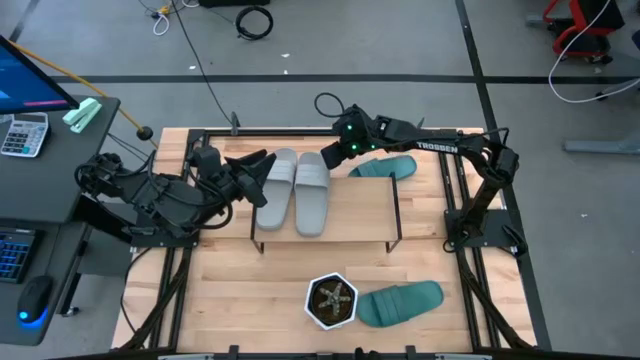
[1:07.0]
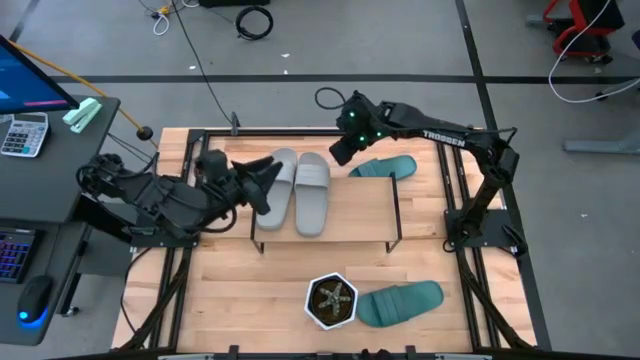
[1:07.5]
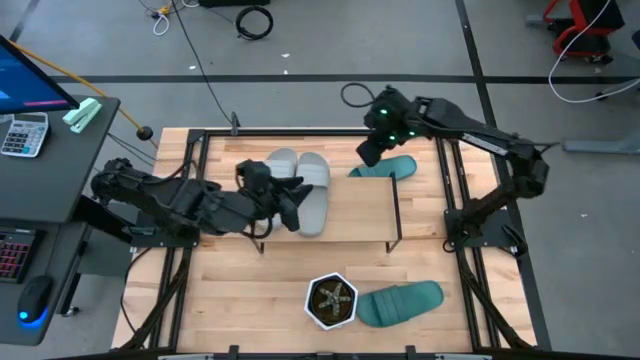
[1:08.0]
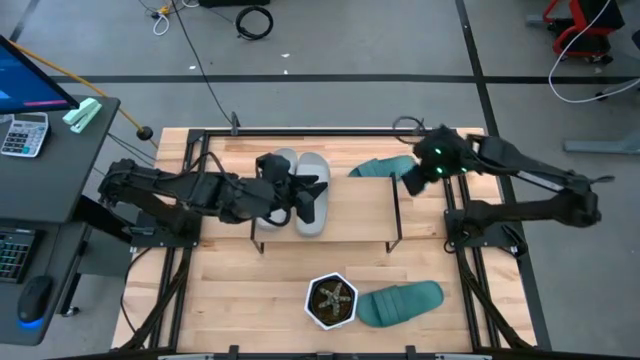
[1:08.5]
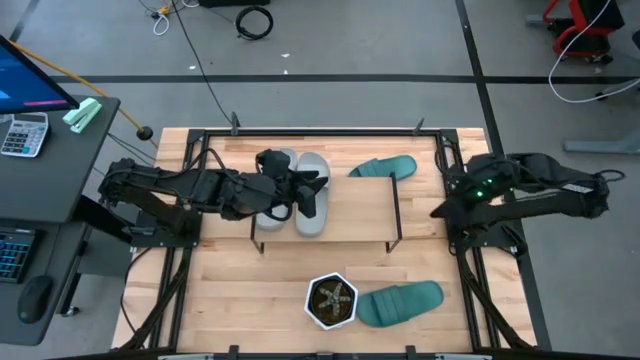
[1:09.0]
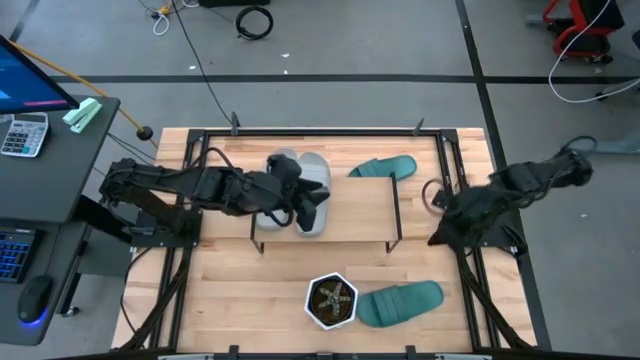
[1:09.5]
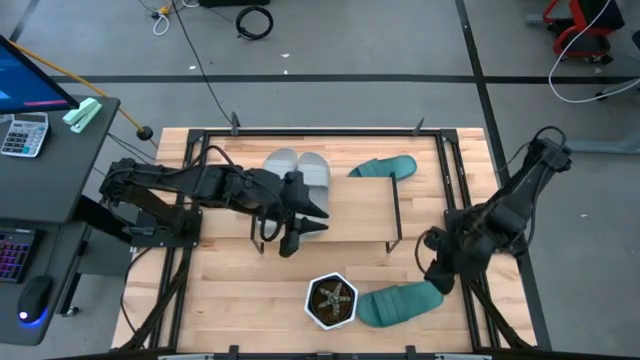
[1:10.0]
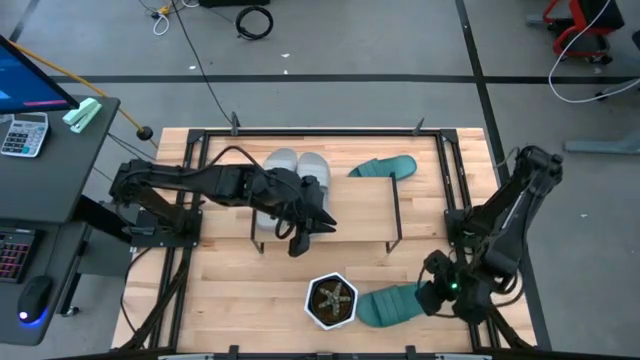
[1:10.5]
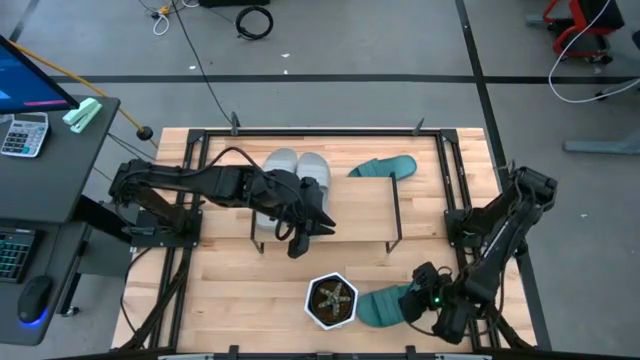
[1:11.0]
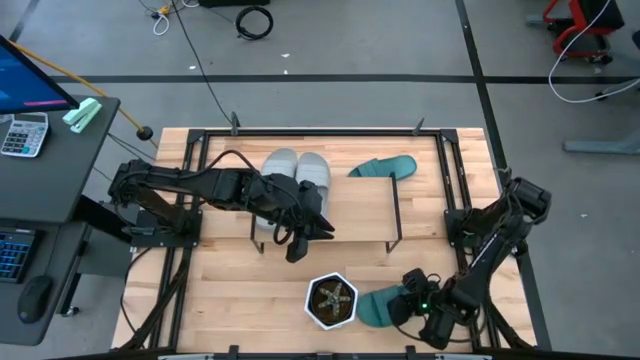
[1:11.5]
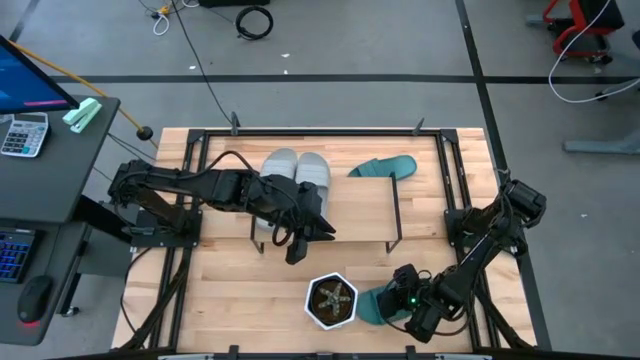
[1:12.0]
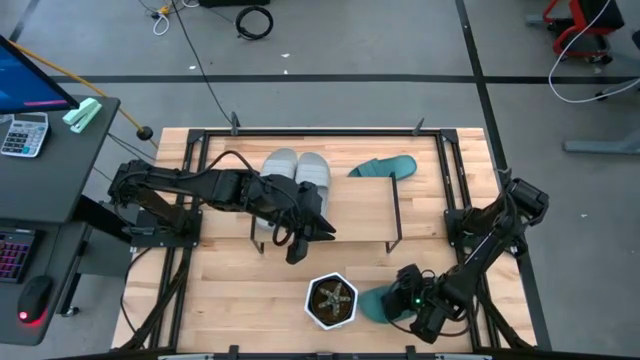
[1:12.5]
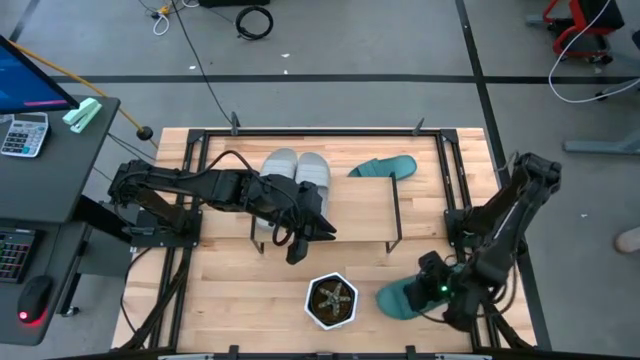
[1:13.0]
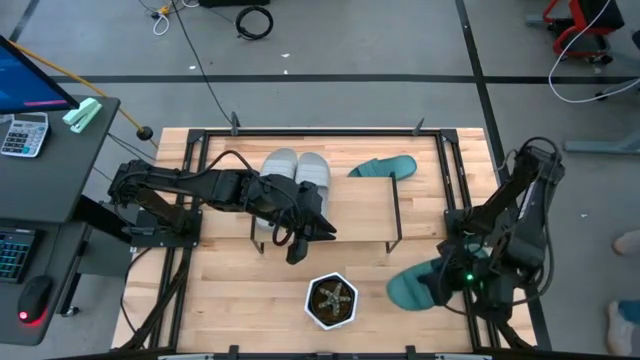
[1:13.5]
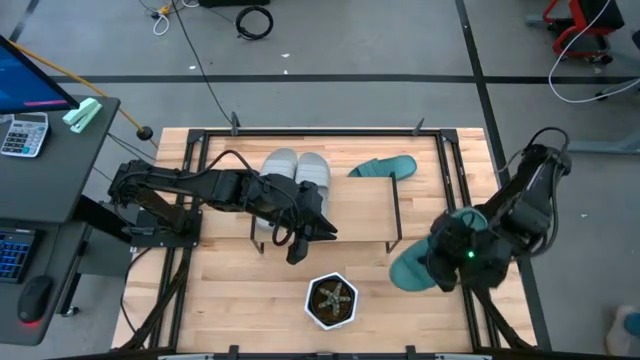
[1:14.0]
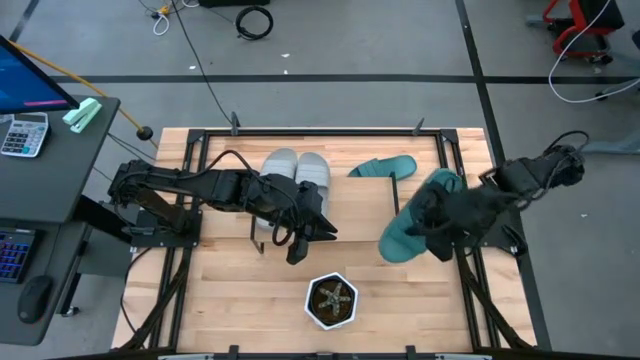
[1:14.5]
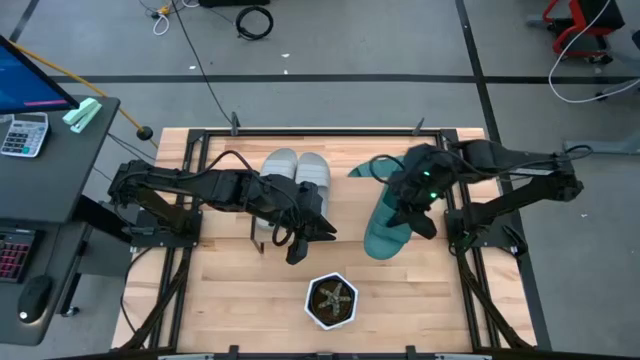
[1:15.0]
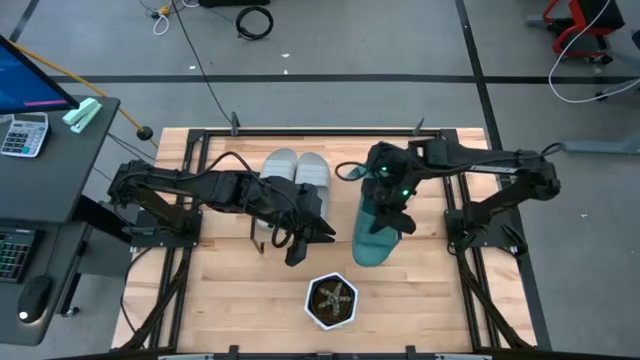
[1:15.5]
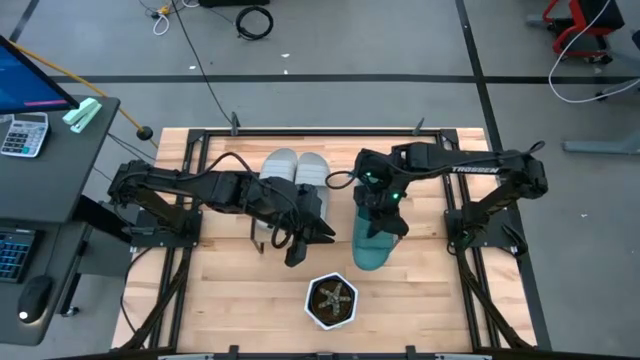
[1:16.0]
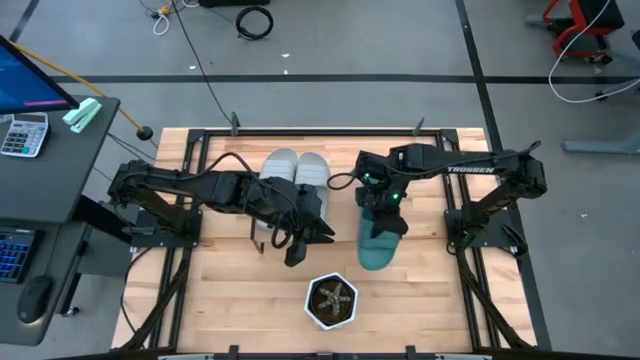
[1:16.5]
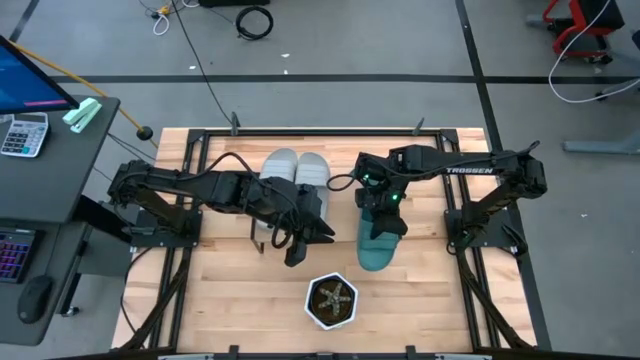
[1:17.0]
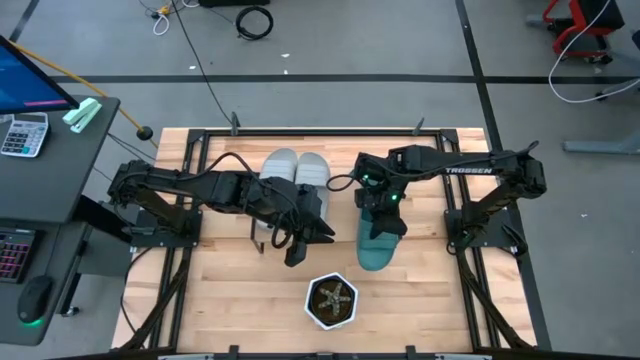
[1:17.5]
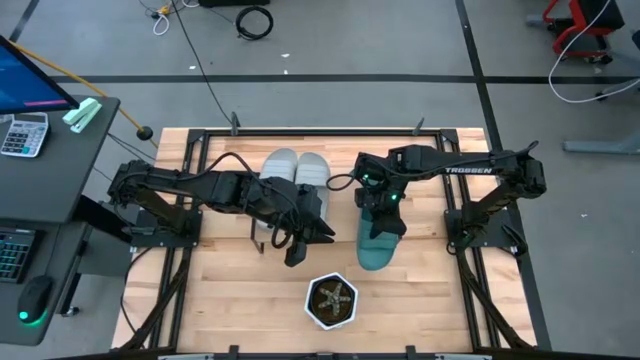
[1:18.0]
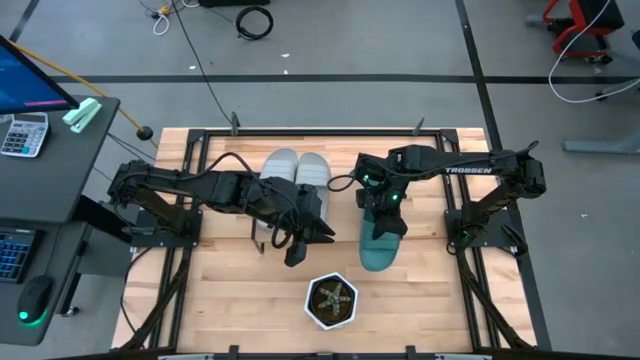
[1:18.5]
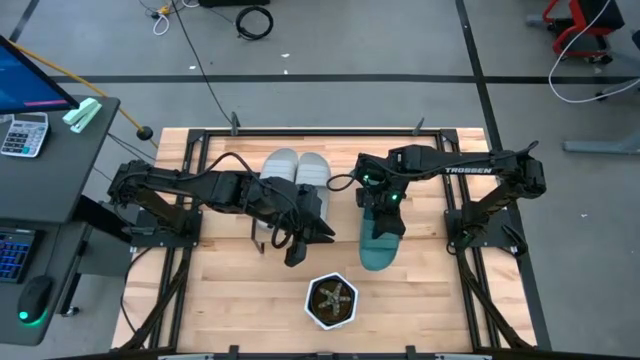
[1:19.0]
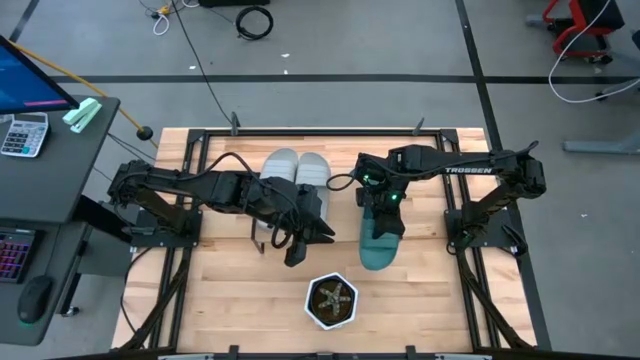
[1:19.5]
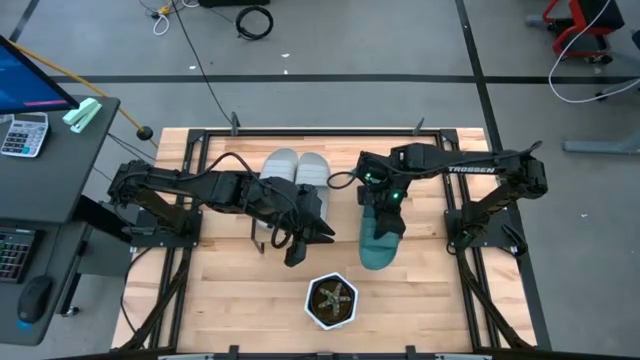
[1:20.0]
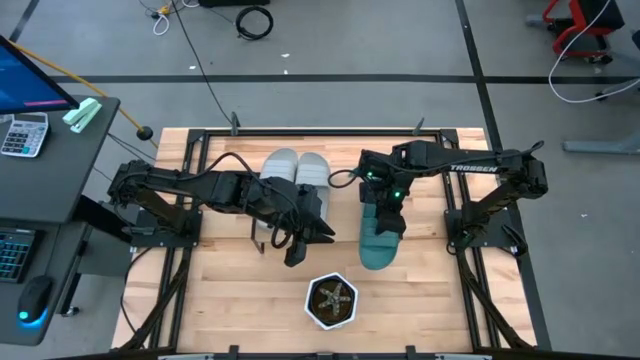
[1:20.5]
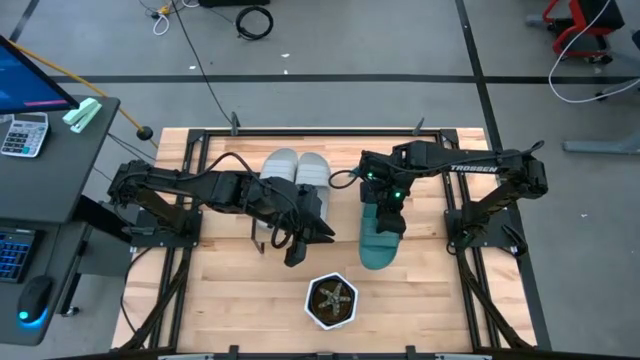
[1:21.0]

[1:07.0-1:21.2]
Task: Pick and place slides into the shelf
Put the bottom green slide on the shelf

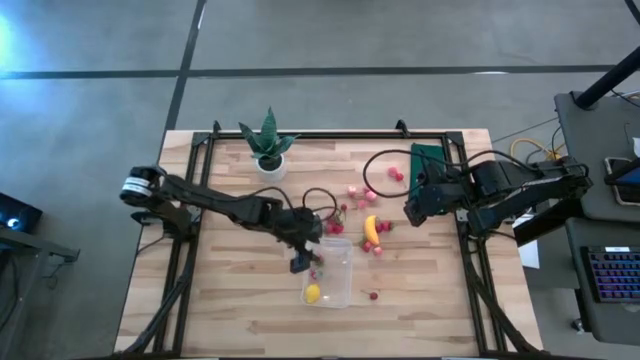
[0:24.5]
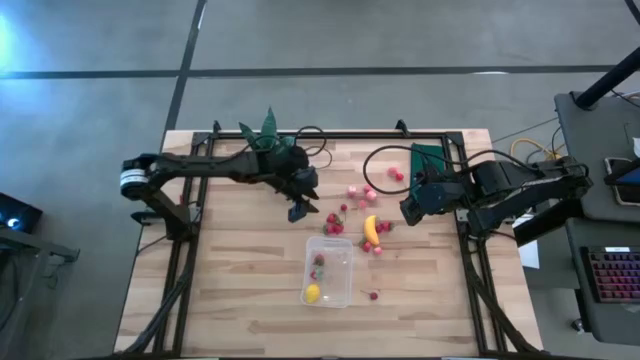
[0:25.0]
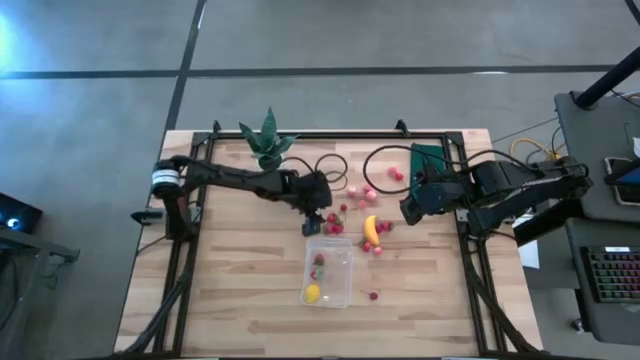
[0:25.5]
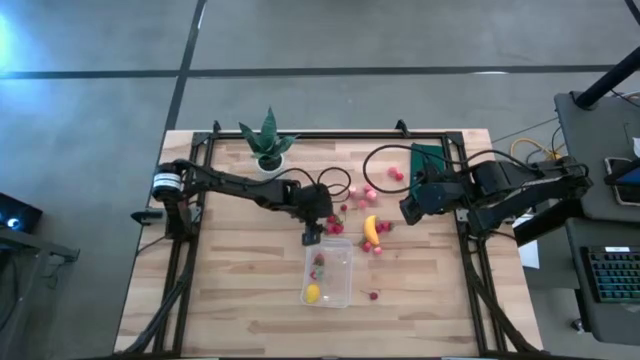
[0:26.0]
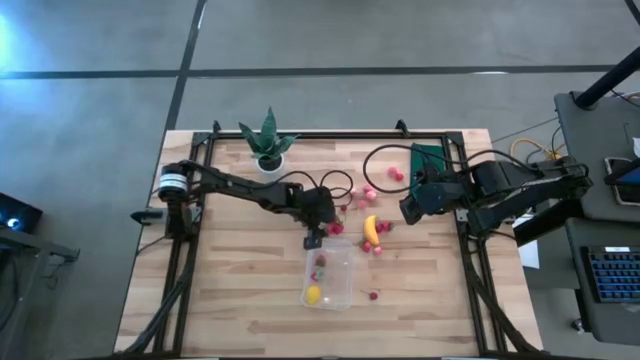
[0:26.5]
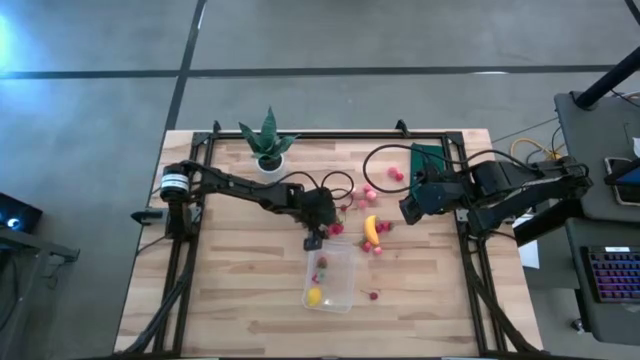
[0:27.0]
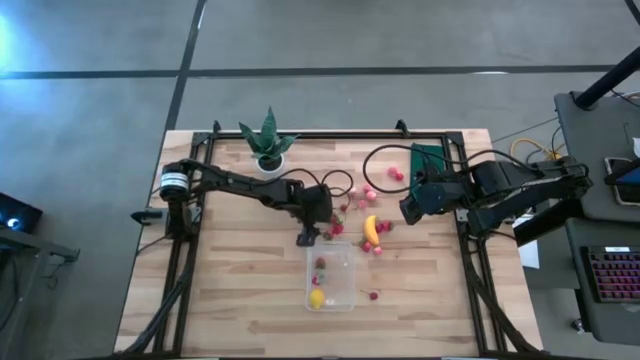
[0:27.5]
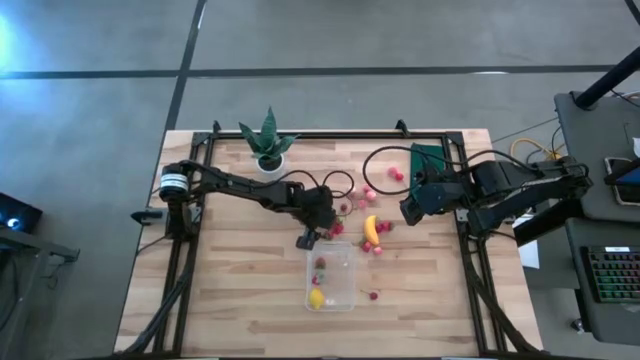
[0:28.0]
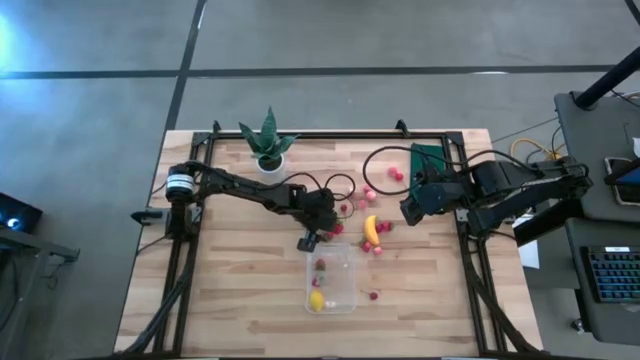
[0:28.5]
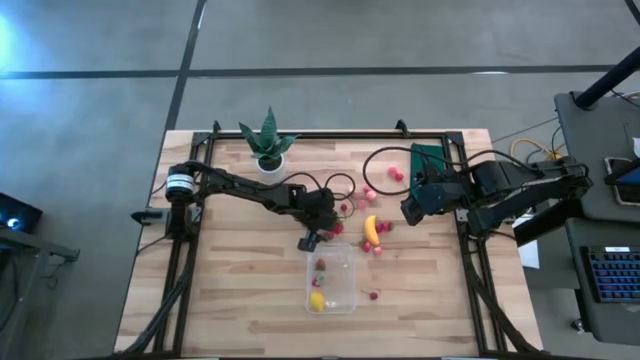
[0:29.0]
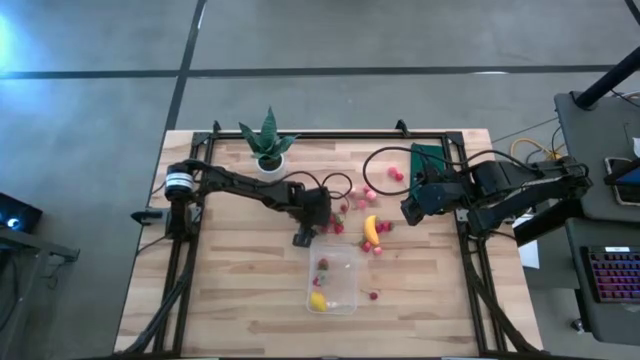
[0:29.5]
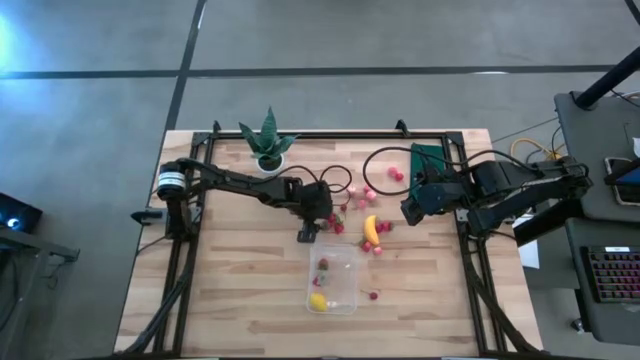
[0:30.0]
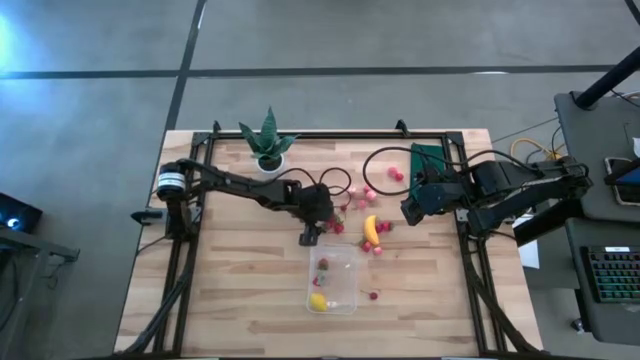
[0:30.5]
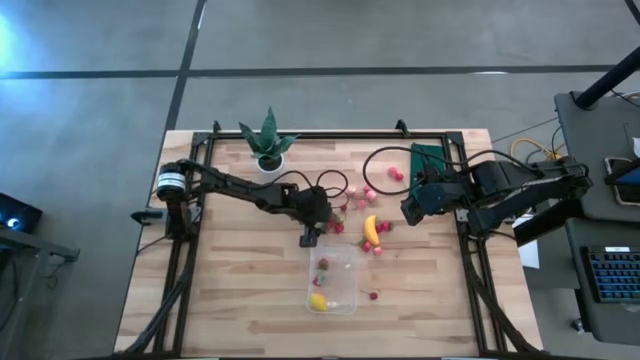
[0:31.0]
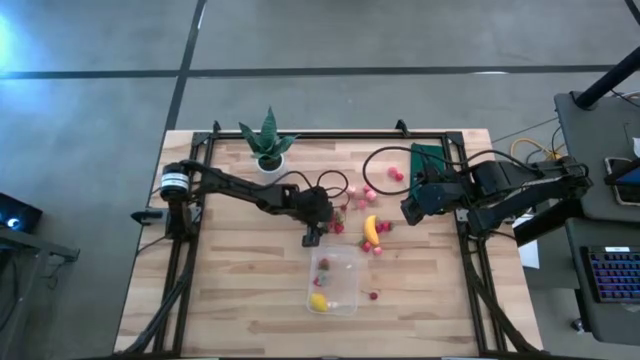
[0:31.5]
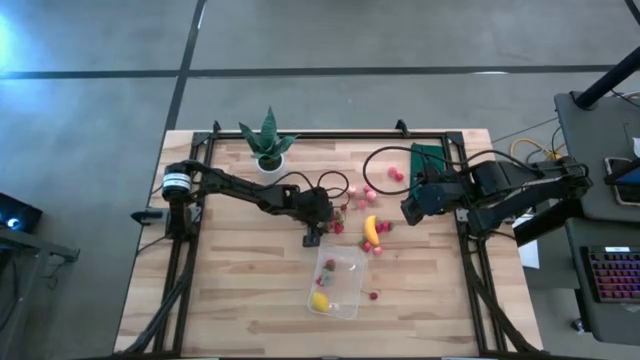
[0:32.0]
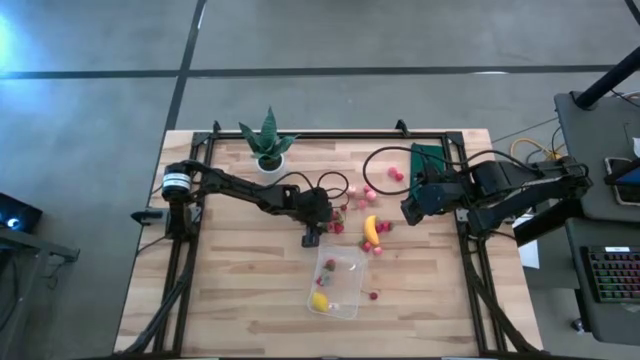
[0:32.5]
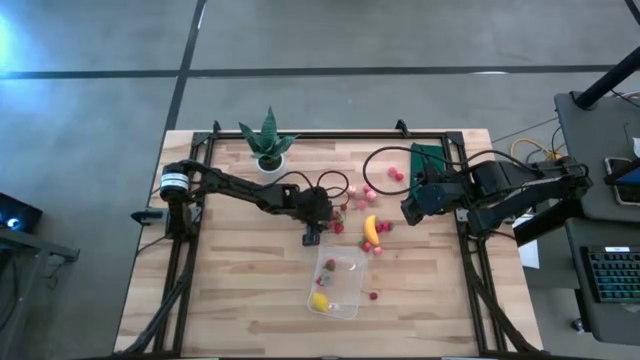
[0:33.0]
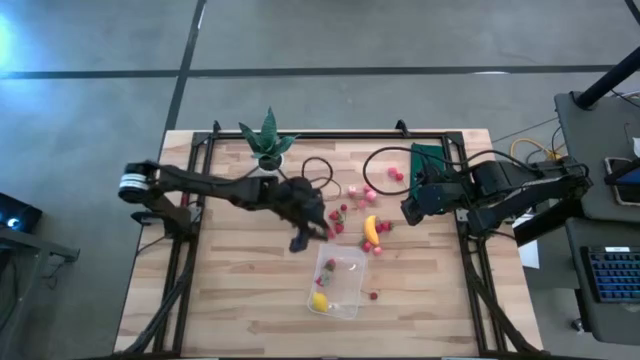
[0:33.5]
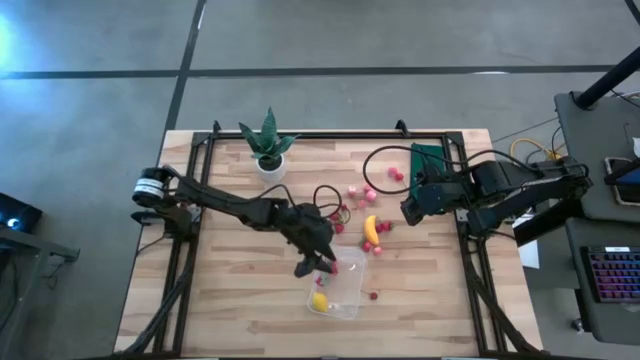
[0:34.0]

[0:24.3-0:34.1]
Task: Pick and placing Produce into tupperware
Put the strawberry into the transparent bin
